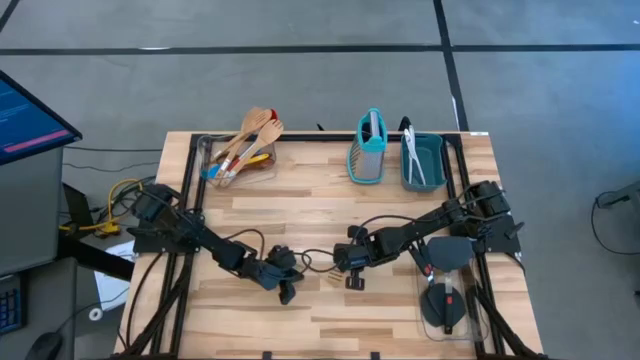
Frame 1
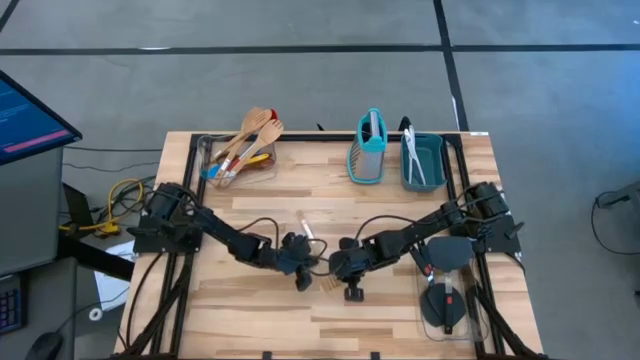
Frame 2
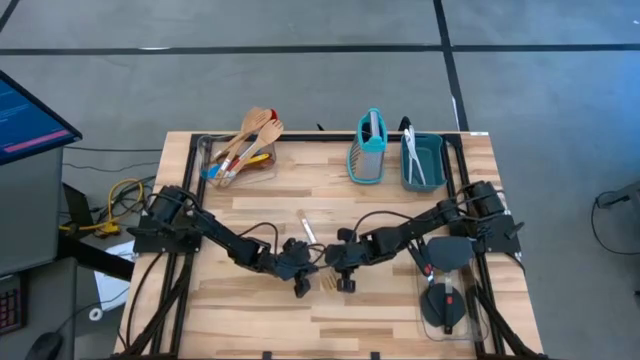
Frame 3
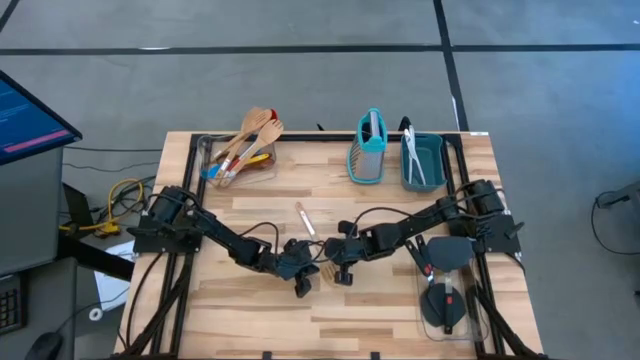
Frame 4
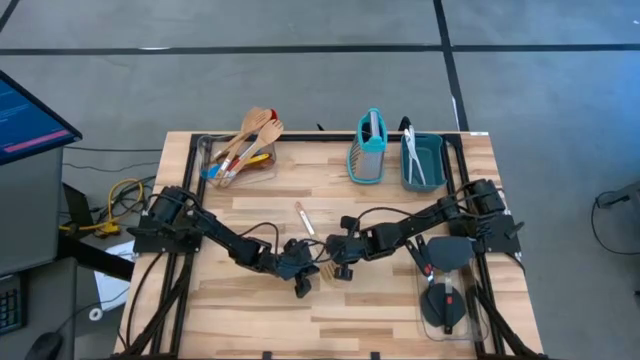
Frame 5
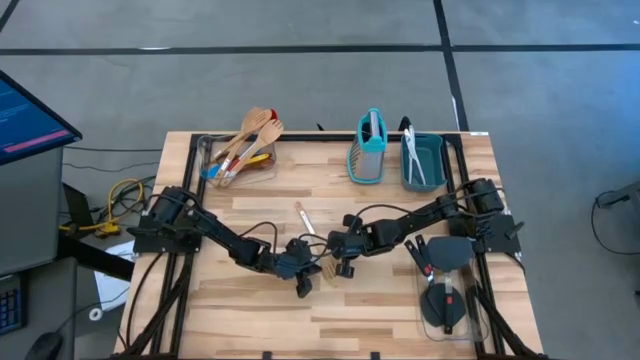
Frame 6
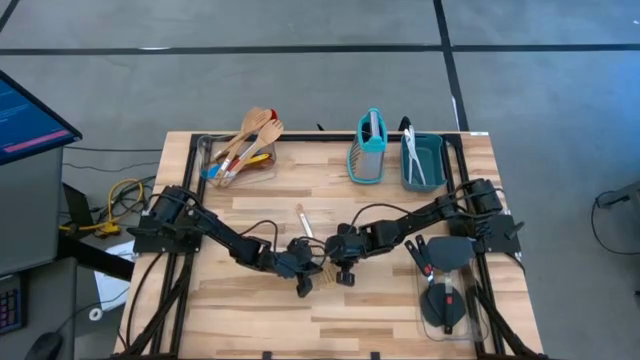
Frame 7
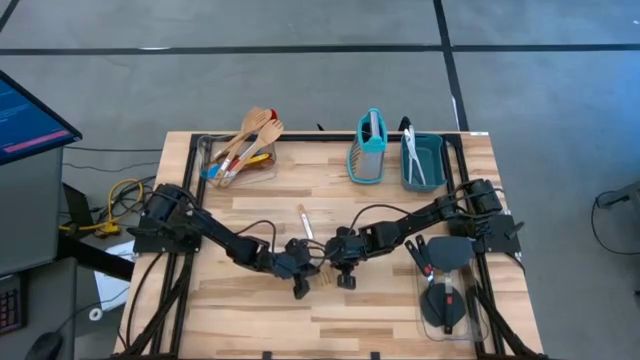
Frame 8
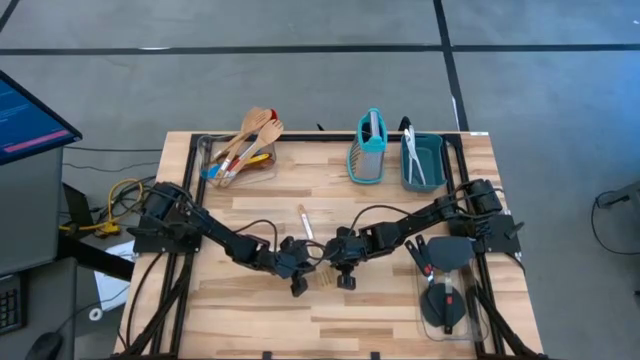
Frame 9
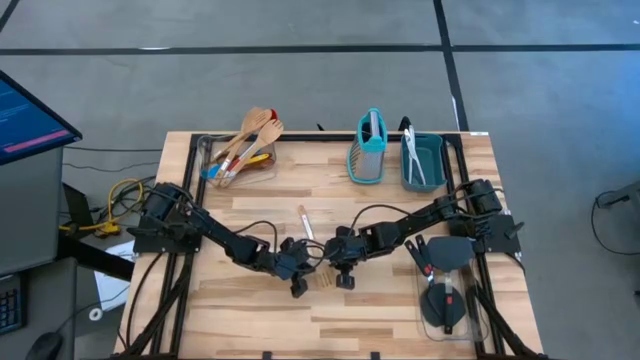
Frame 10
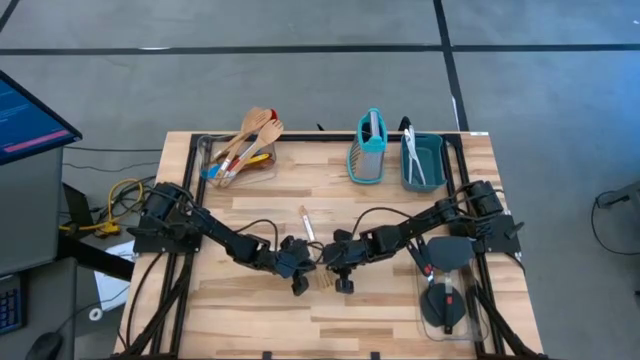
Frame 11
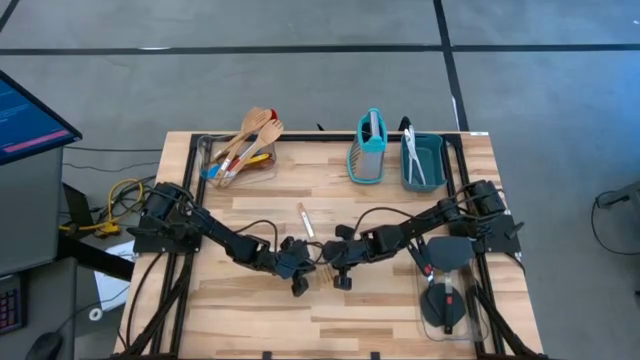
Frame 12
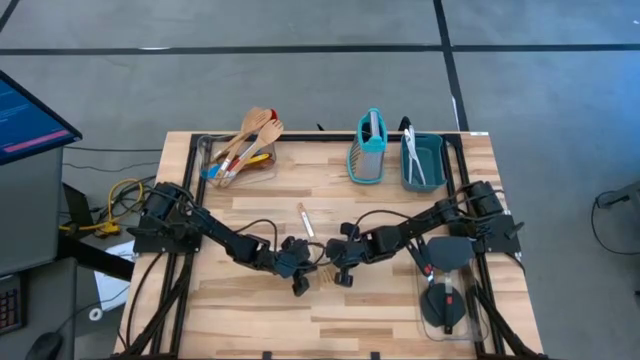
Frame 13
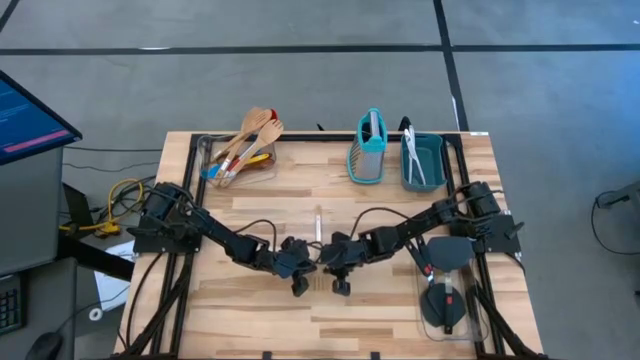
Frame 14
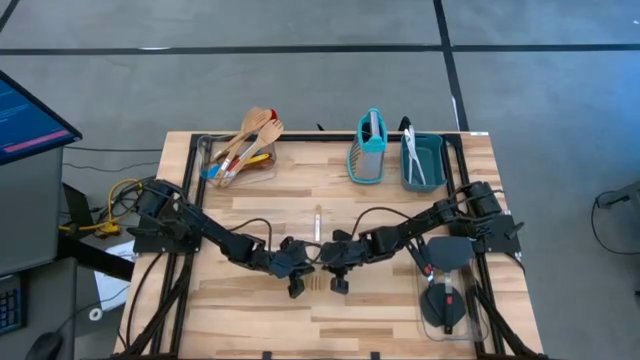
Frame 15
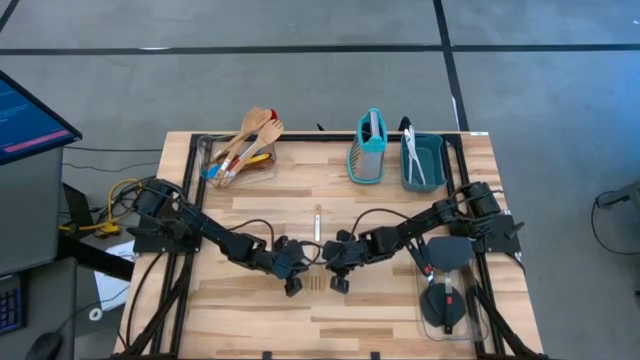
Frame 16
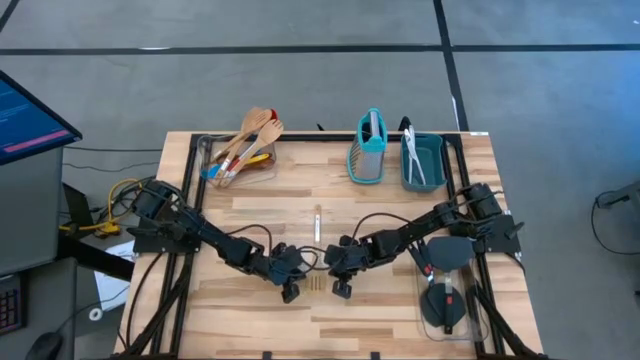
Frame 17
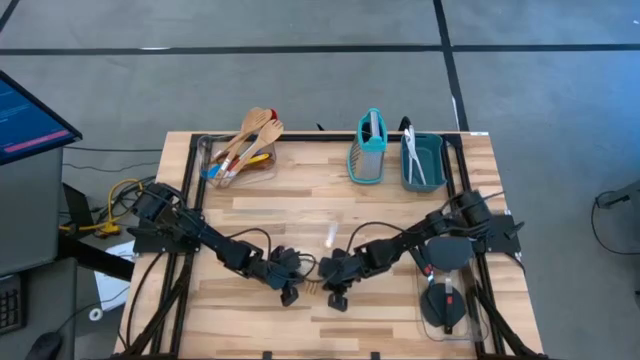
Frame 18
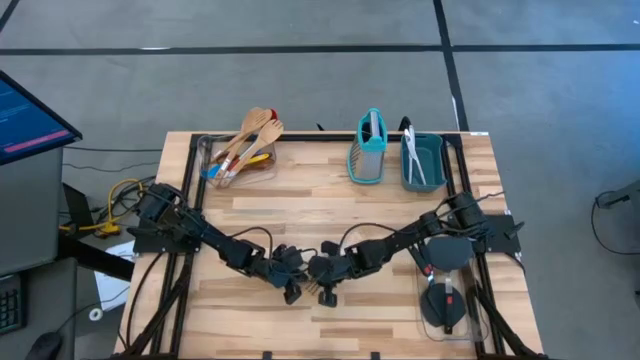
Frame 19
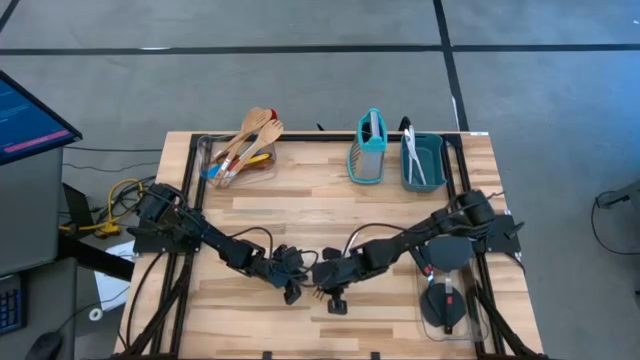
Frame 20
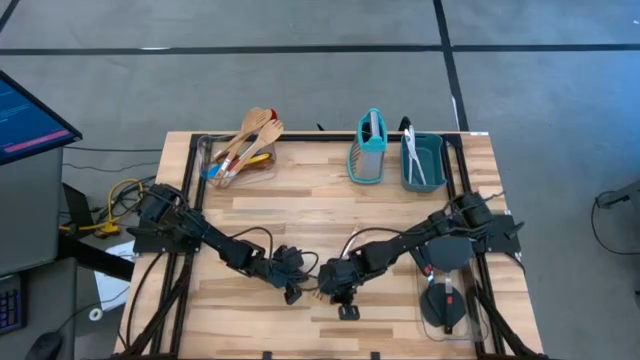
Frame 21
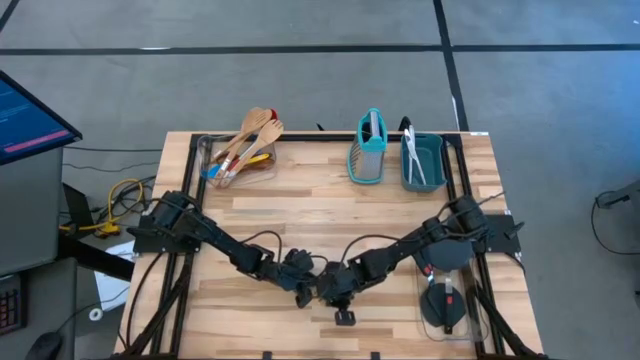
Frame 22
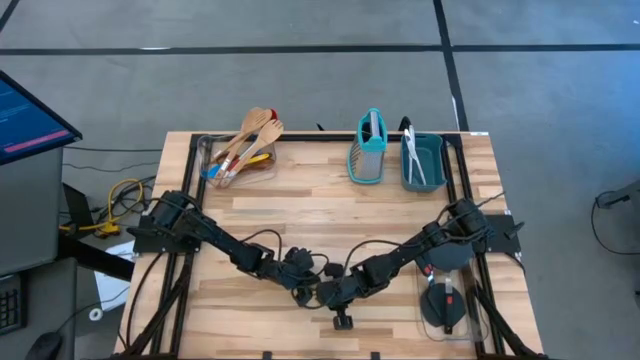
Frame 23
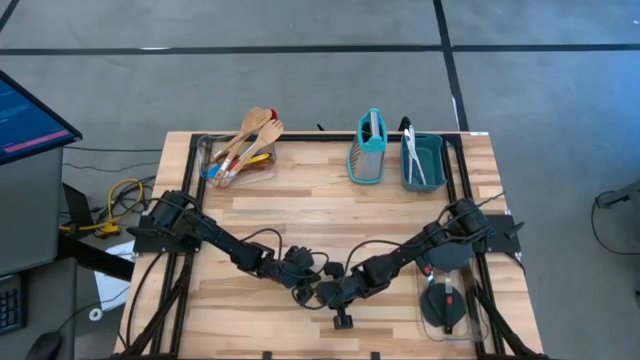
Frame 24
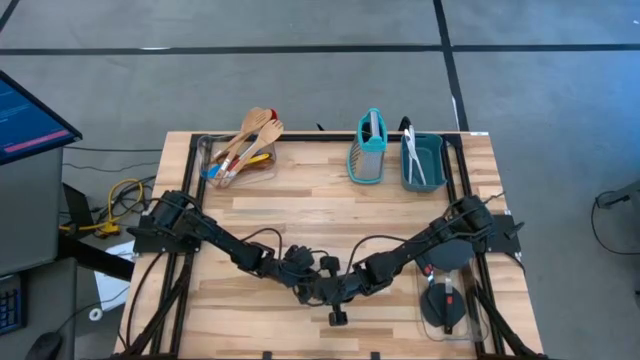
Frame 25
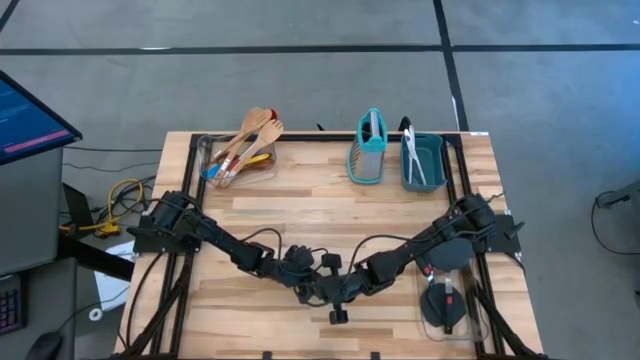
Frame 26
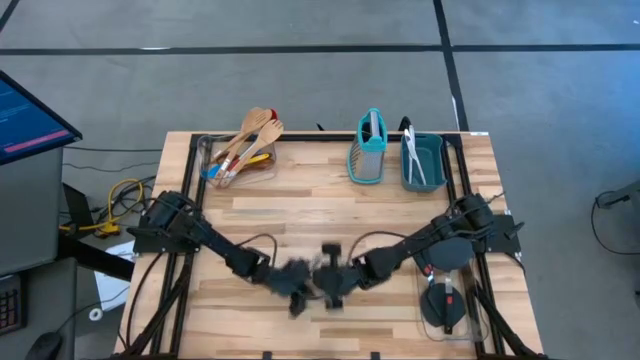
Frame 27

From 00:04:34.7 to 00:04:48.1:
Task: Pick & Place Kitchen Items
Put the wooden slotted spoon into the left transparent bin

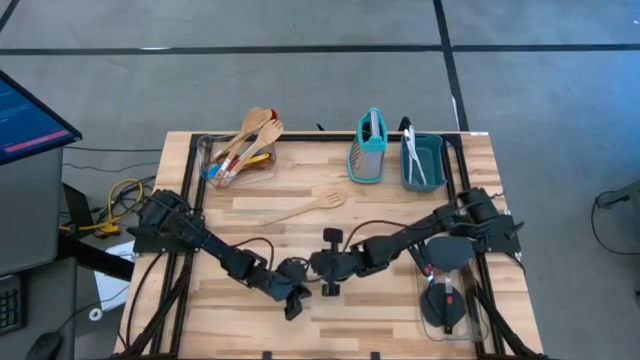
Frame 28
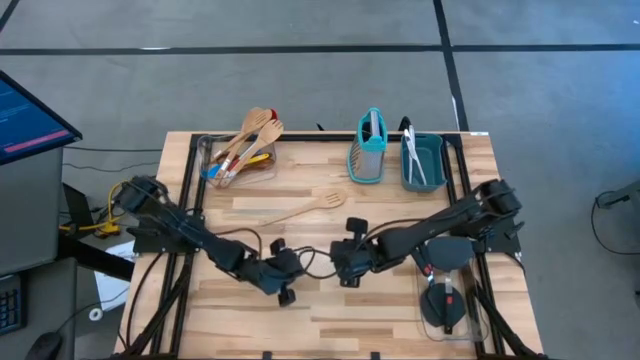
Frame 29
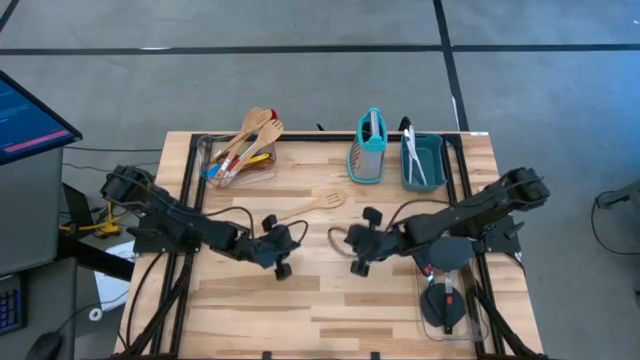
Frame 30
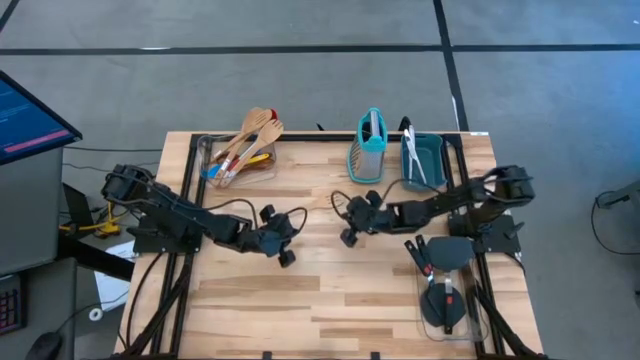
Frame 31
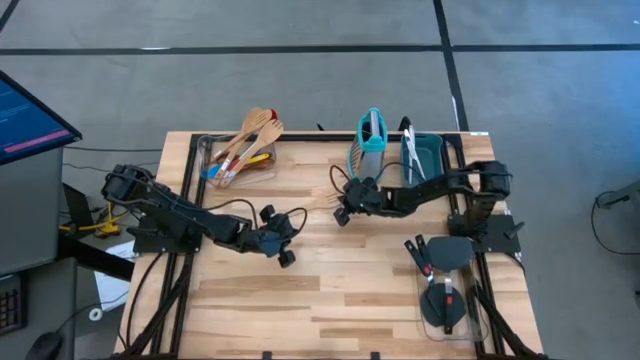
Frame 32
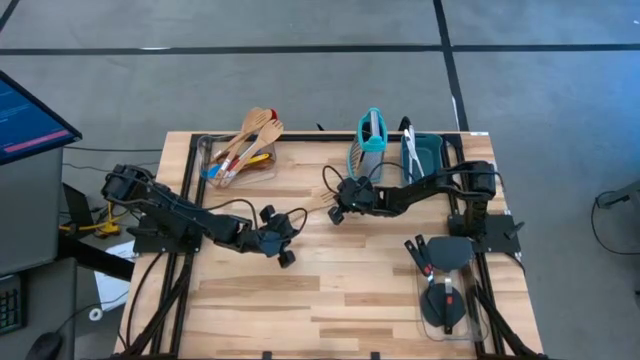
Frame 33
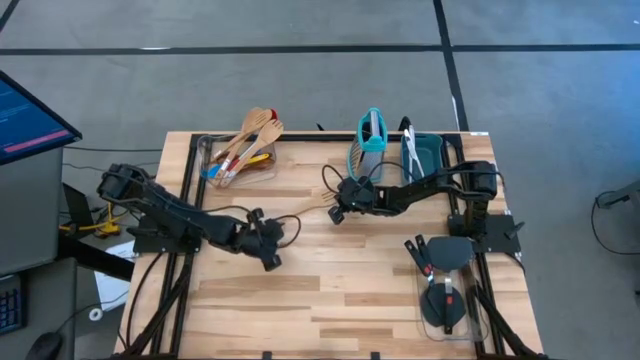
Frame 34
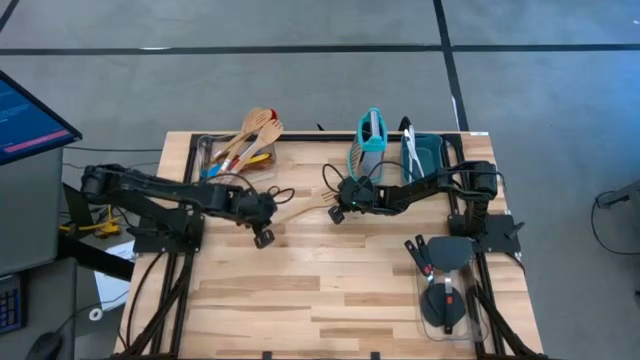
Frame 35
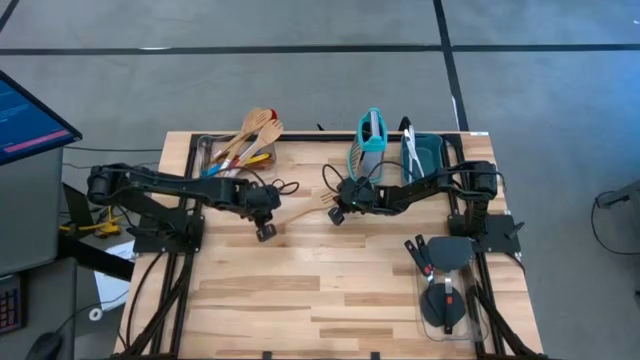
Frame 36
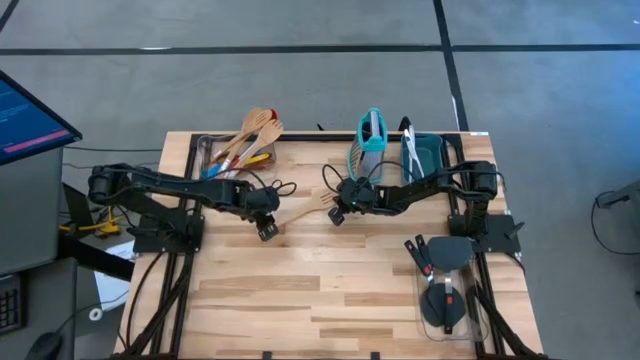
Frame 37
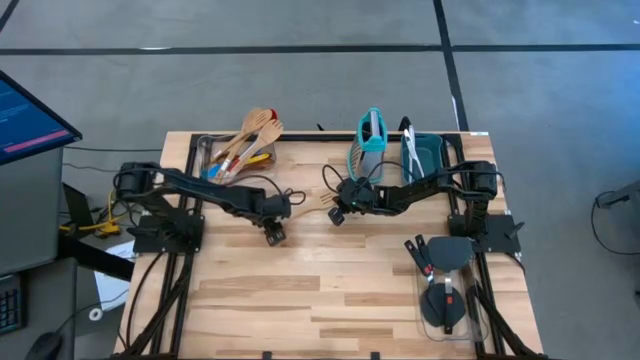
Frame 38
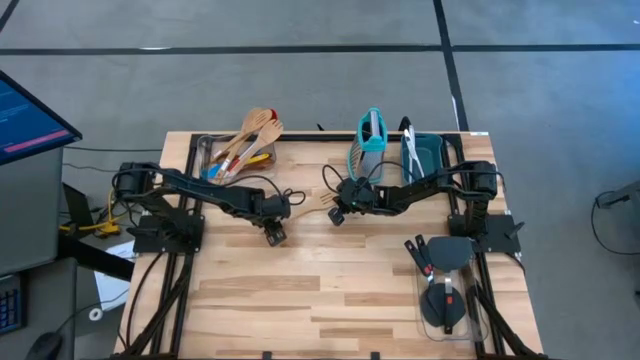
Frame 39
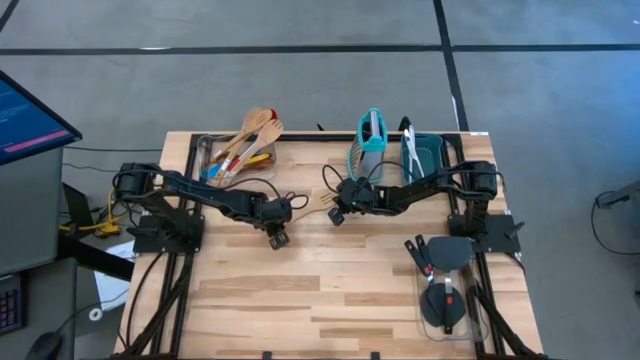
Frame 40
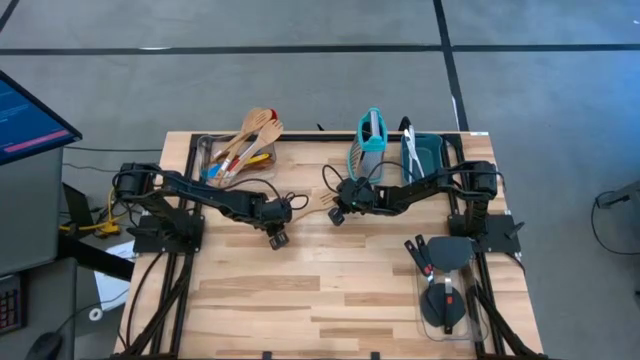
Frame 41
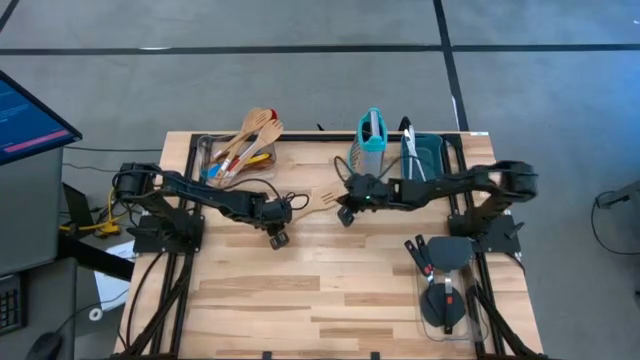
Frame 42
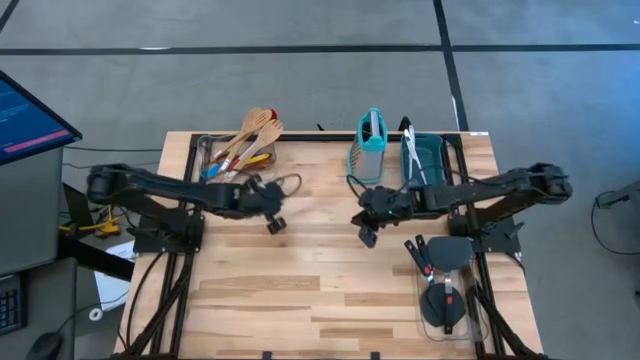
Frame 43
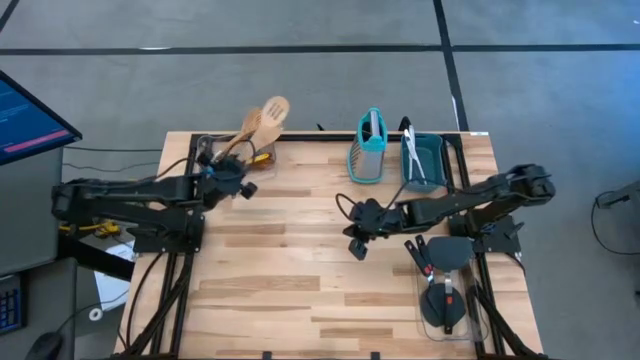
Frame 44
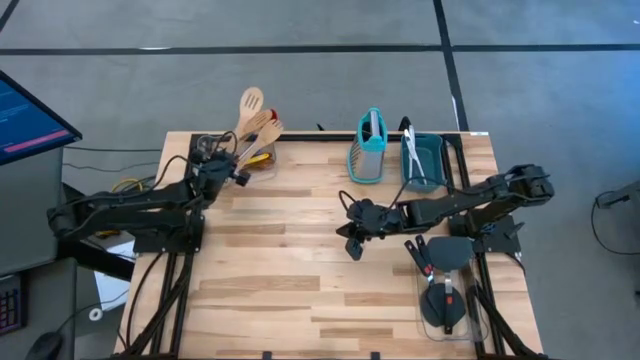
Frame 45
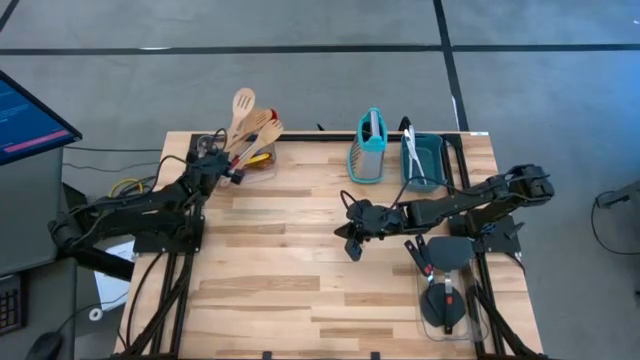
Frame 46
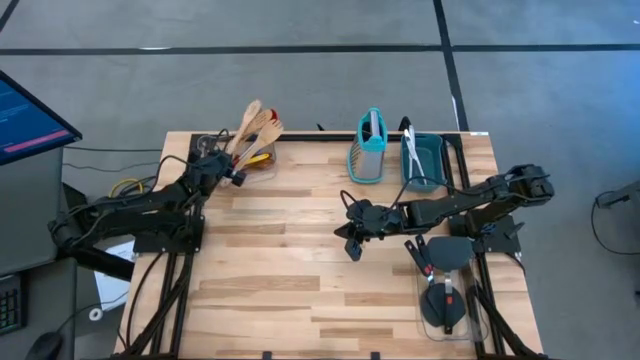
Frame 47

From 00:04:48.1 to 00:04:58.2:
Put the wooden slotted spoon into the left transparent bin
